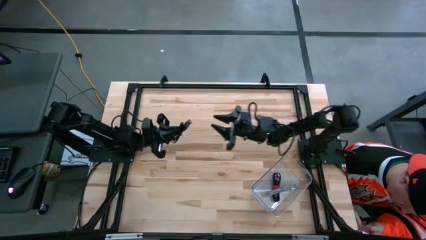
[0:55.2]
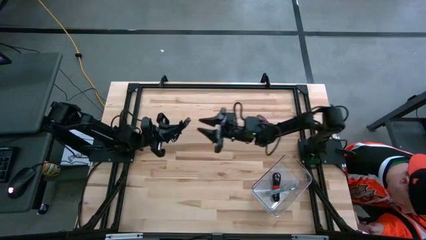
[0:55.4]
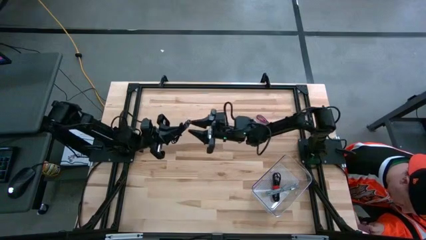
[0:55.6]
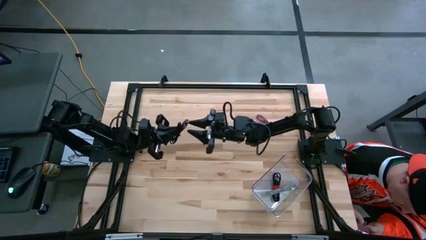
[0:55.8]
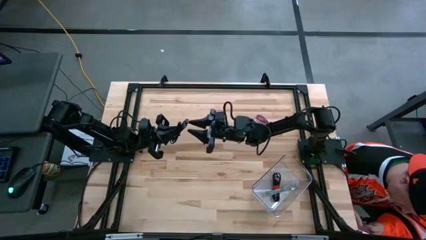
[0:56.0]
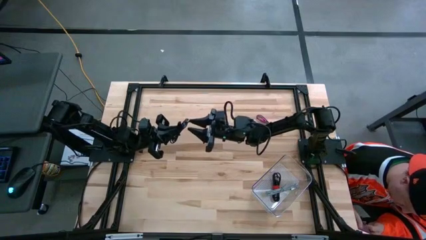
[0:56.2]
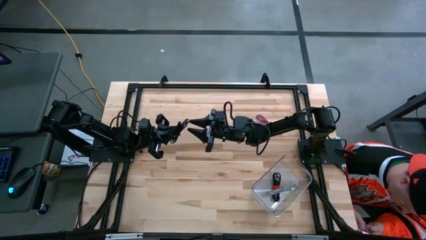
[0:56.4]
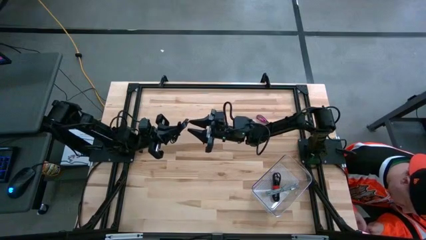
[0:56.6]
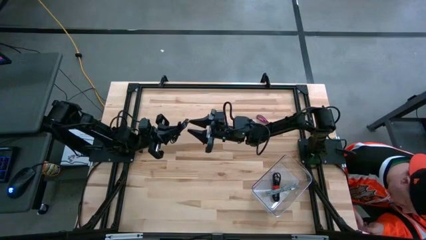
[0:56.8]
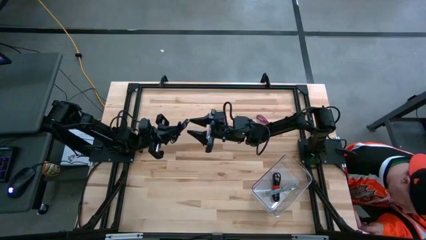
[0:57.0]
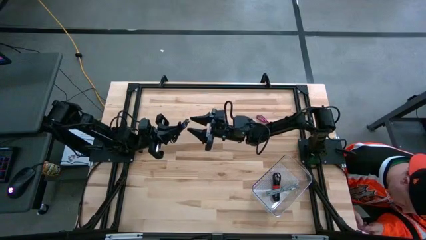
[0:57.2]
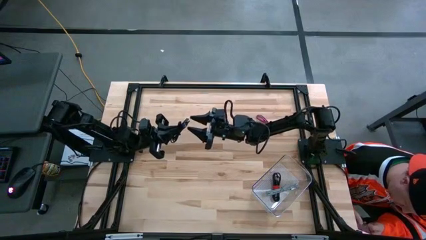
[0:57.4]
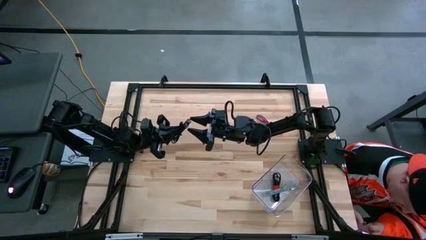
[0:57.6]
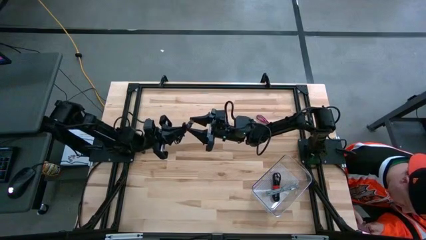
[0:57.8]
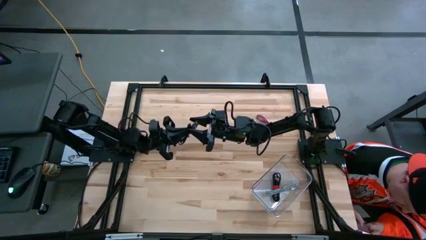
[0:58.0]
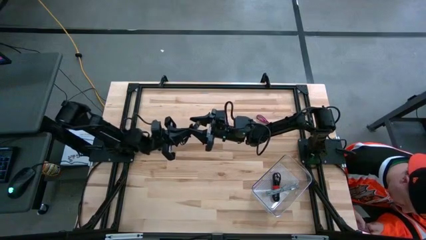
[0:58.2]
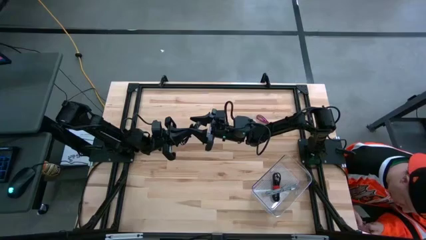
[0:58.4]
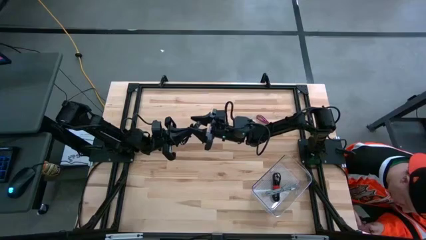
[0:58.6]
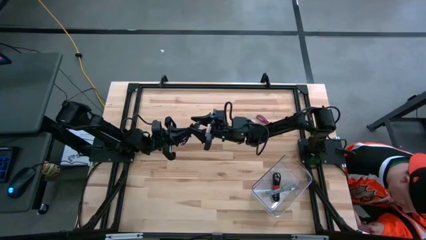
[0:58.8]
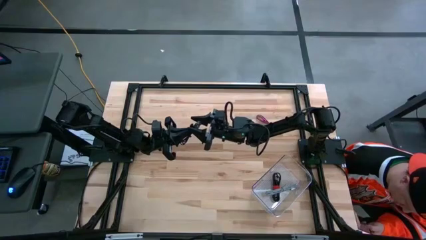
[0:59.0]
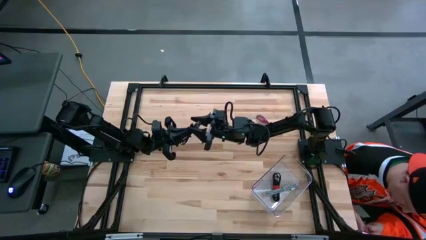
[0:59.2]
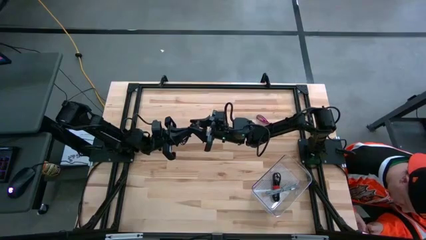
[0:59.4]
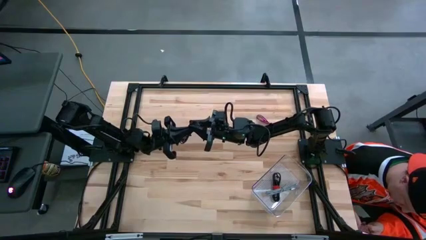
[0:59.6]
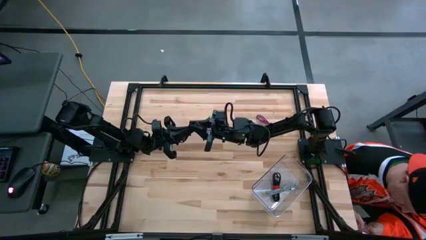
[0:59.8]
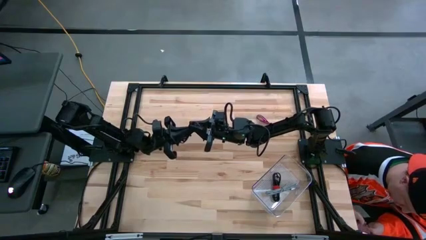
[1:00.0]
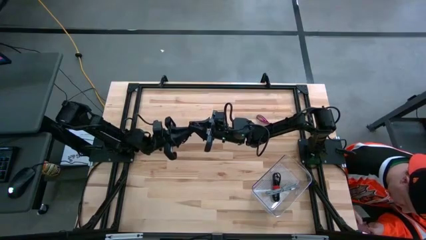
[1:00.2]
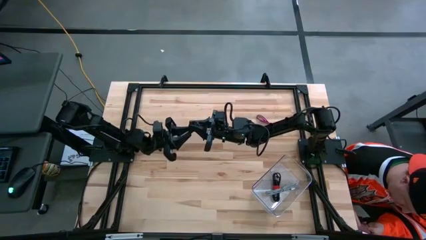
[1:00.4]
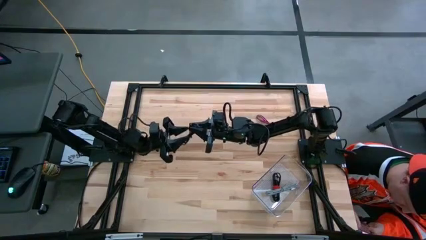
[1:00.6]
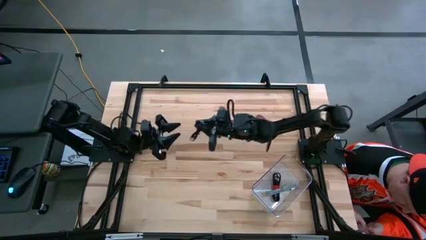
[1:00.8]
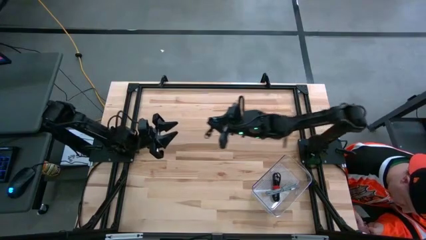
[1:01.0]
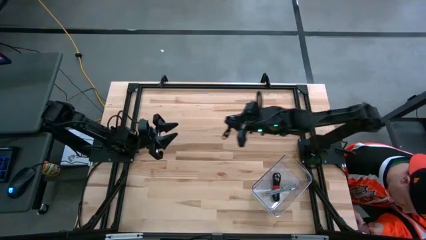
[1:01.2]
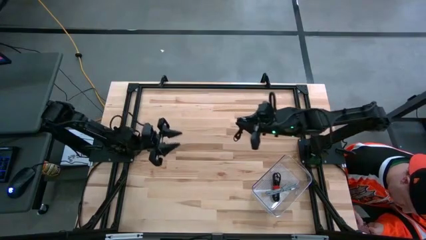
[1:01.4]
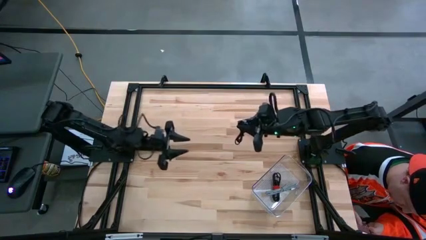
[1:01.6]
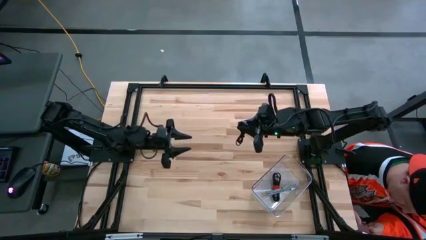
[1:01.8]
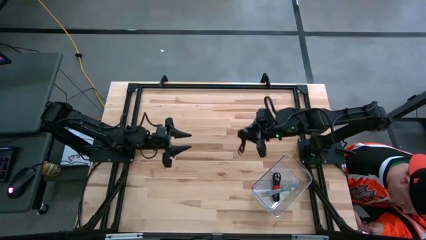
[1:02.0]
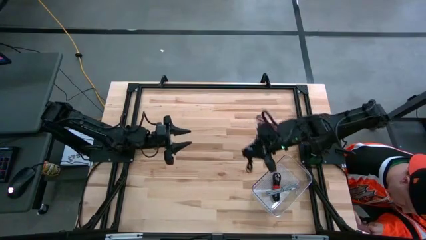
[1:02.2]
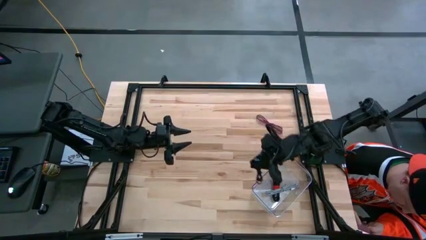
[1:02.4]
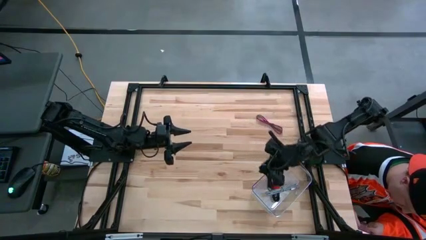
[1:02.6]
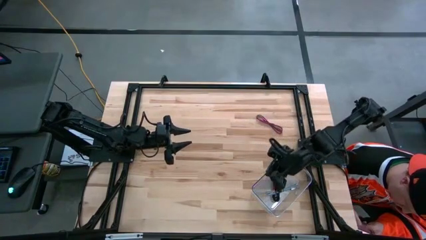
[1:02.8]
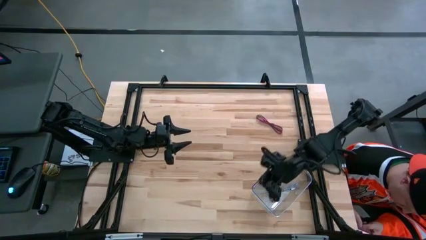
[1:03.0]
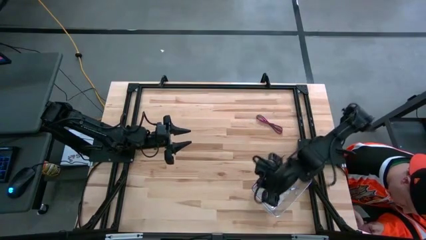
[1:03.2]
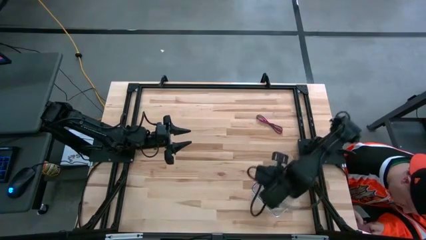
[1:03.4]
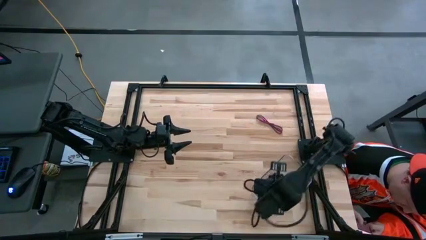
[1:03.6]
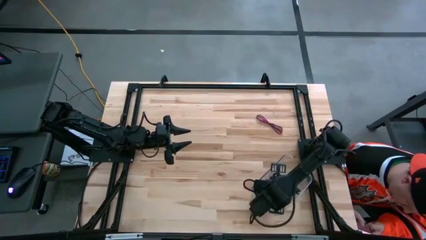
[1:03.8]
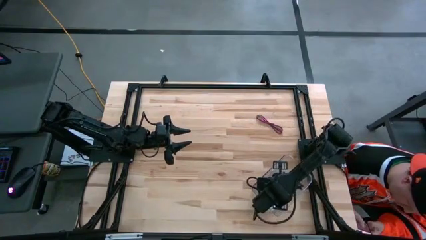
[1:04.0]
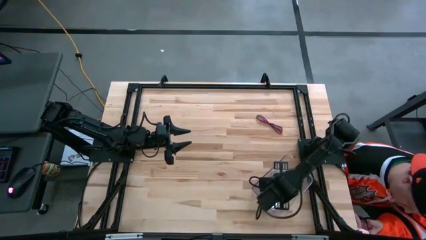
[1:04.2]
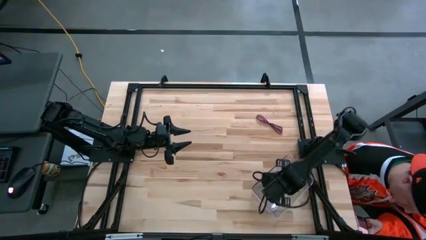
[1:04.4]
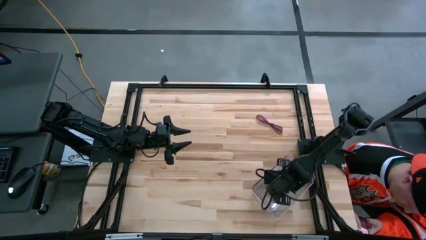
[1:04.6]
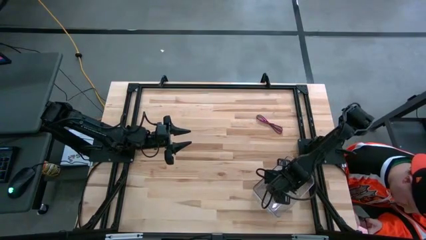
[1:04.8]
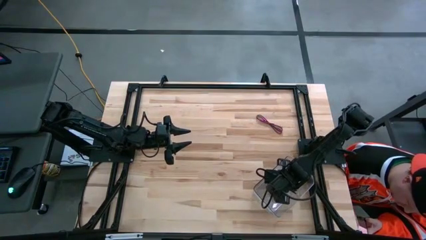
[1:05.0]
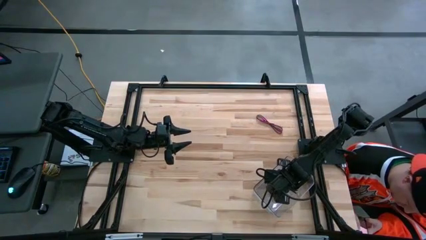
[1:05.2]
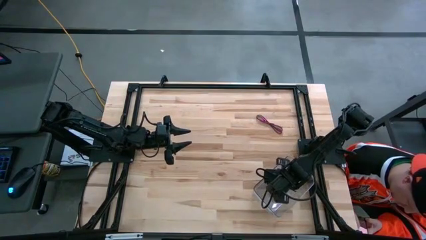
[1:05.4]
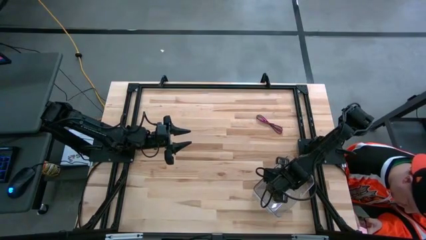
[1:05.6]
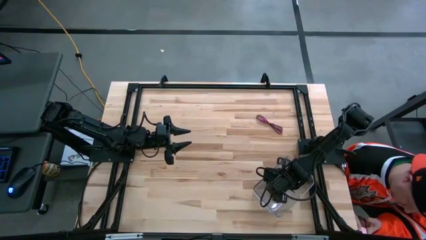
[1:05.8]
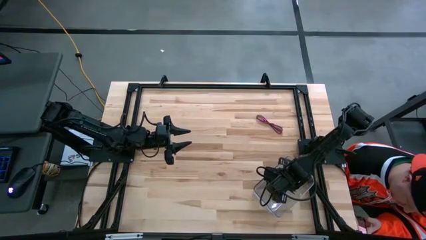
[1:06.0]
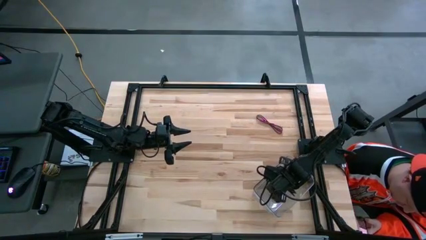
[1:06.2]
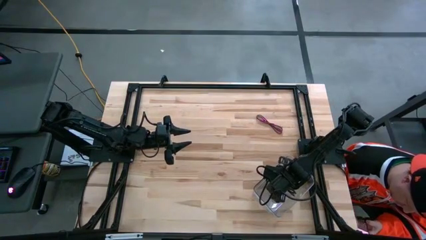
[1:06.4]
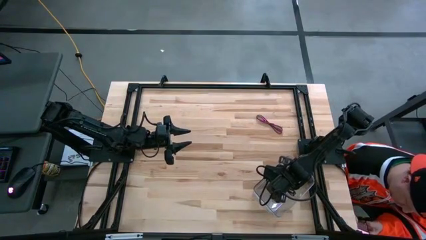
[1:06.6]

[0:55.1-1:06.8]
Task: Pick and place USB-C Cables
Put the black charger cable into the transparent bin
